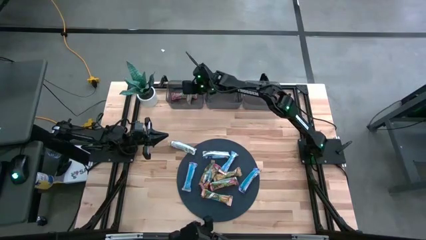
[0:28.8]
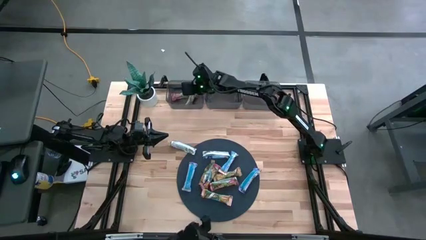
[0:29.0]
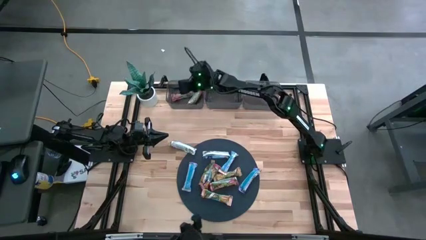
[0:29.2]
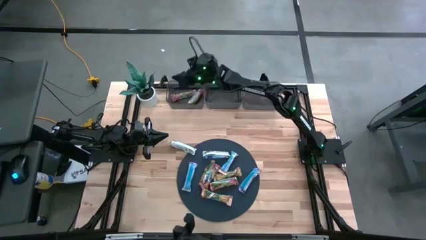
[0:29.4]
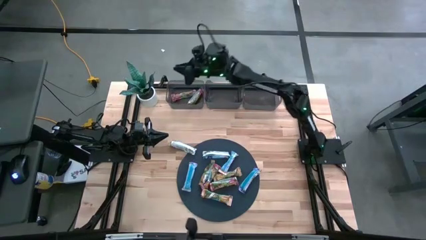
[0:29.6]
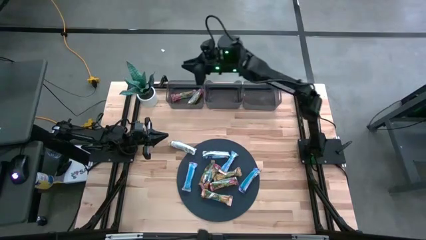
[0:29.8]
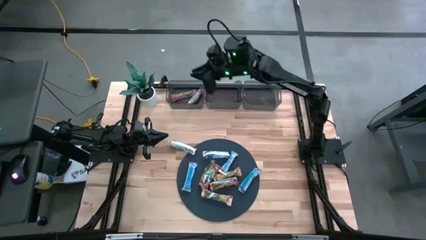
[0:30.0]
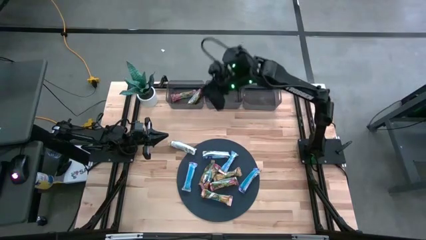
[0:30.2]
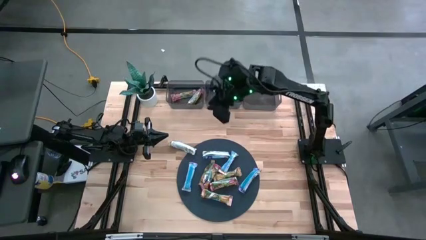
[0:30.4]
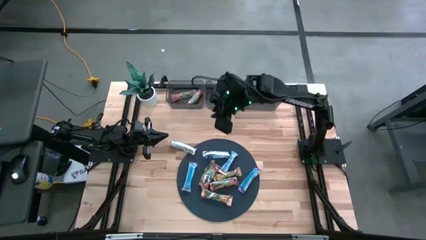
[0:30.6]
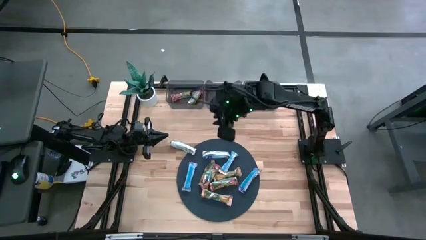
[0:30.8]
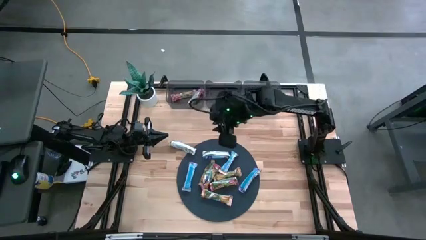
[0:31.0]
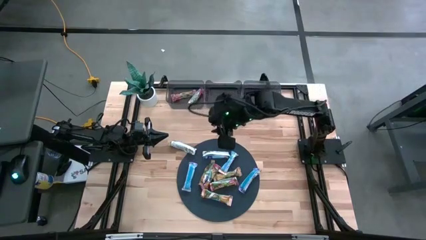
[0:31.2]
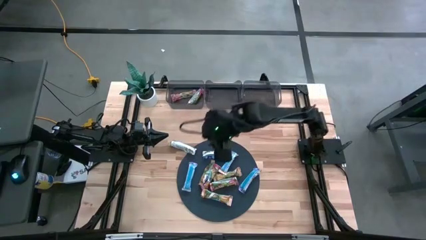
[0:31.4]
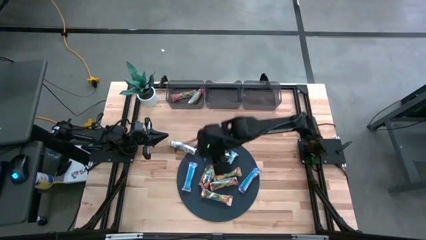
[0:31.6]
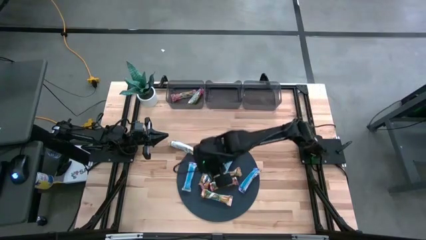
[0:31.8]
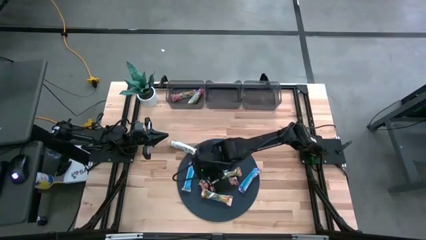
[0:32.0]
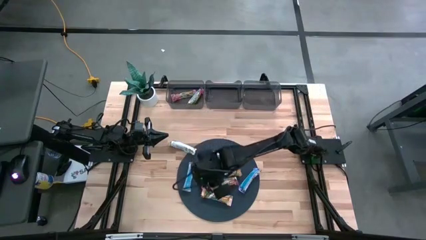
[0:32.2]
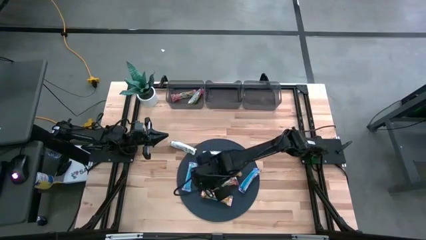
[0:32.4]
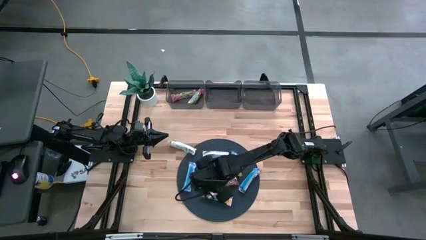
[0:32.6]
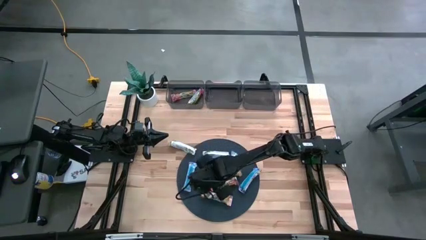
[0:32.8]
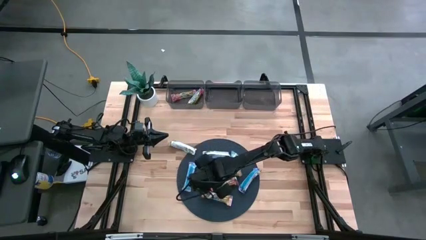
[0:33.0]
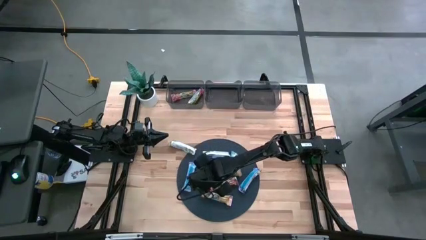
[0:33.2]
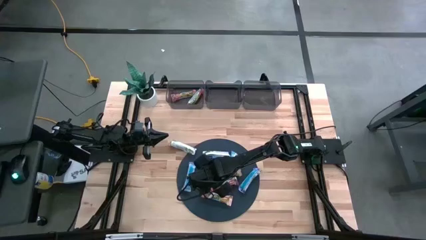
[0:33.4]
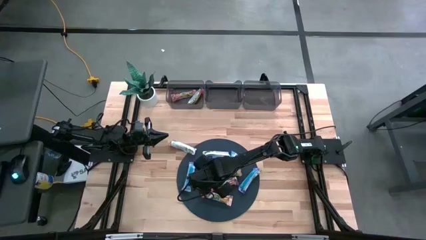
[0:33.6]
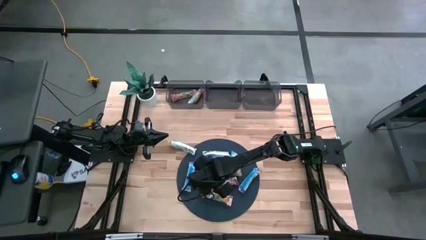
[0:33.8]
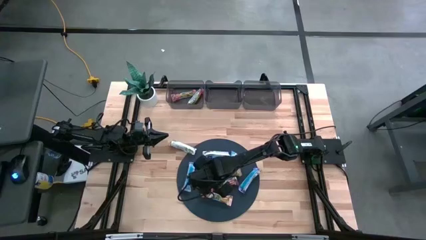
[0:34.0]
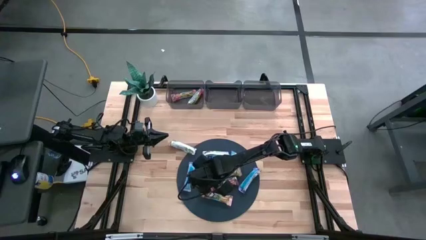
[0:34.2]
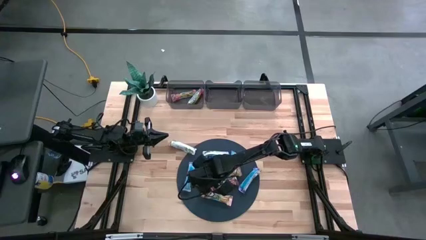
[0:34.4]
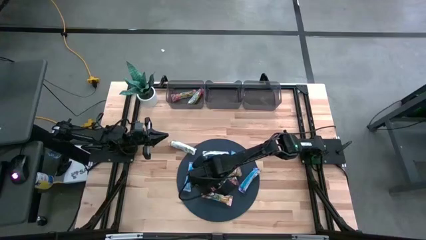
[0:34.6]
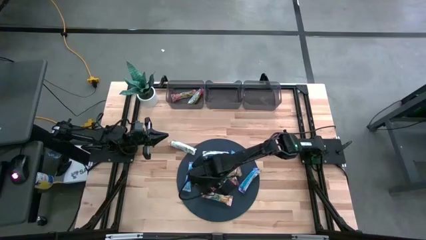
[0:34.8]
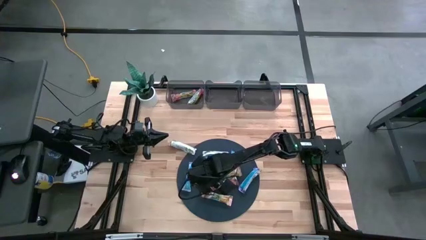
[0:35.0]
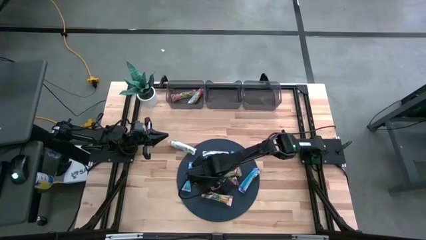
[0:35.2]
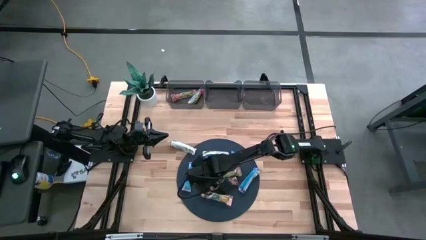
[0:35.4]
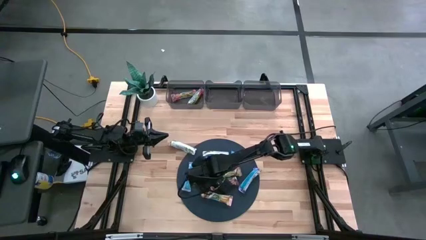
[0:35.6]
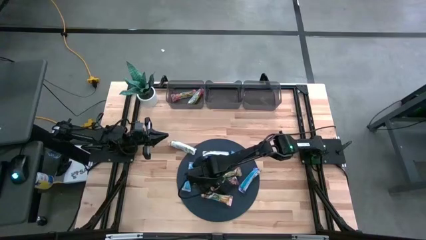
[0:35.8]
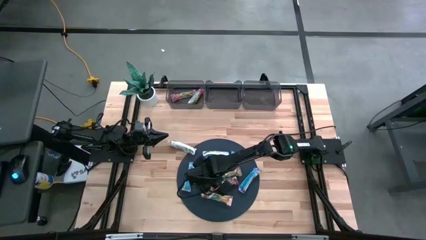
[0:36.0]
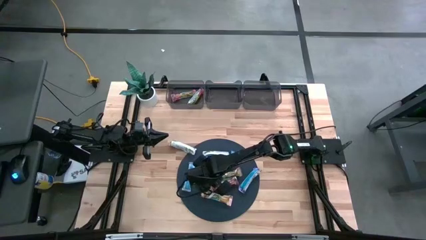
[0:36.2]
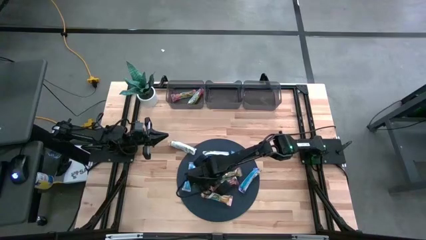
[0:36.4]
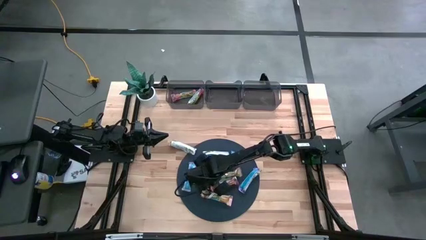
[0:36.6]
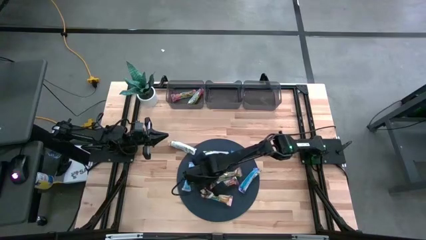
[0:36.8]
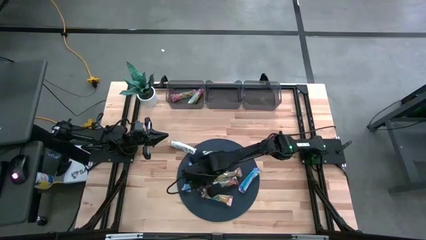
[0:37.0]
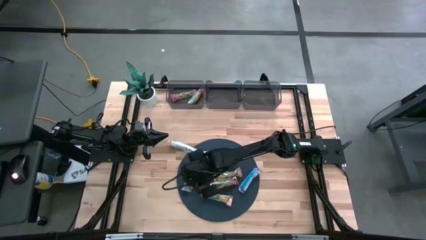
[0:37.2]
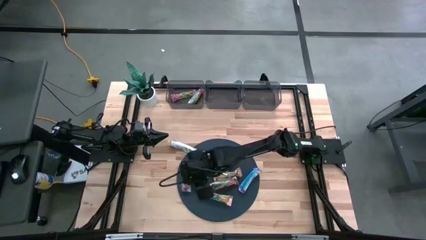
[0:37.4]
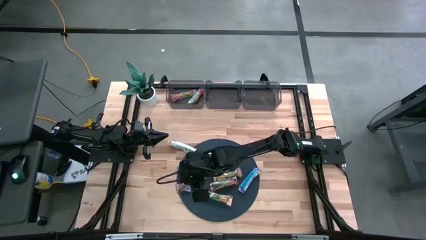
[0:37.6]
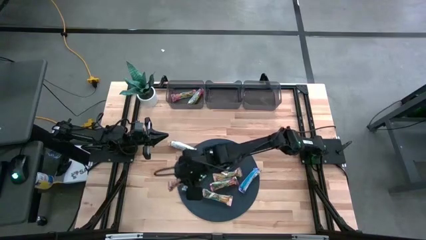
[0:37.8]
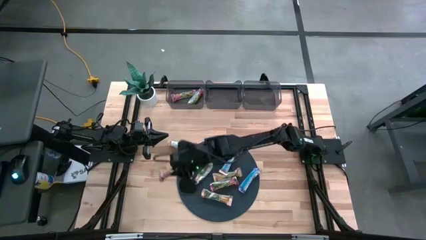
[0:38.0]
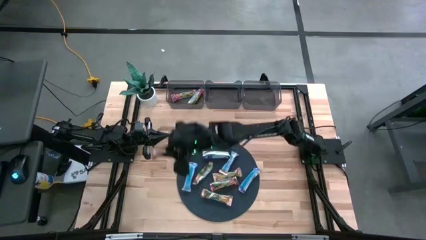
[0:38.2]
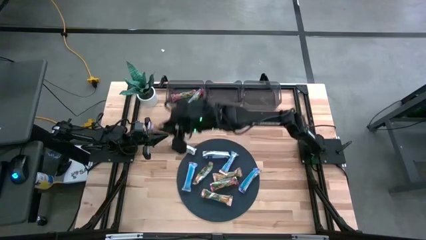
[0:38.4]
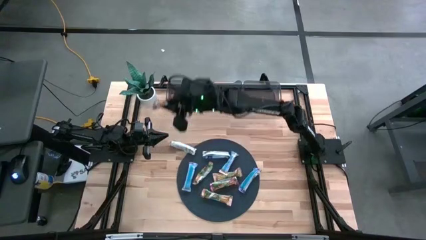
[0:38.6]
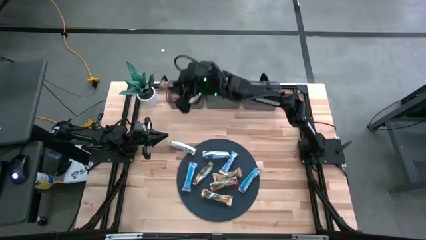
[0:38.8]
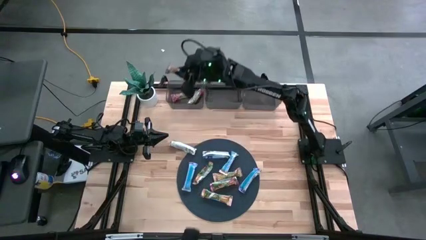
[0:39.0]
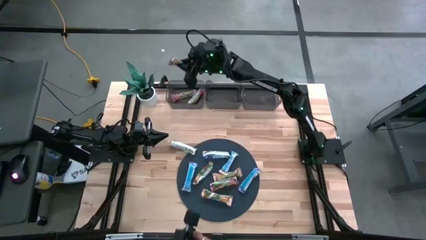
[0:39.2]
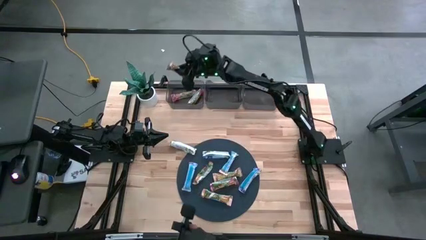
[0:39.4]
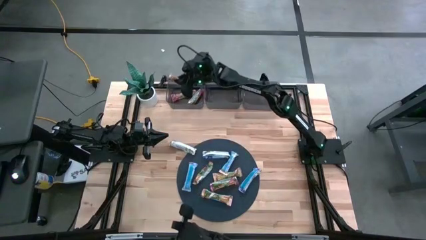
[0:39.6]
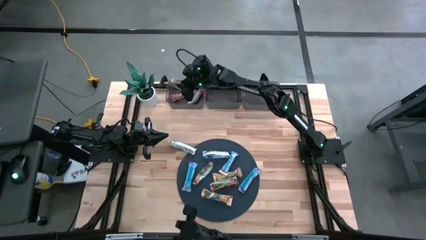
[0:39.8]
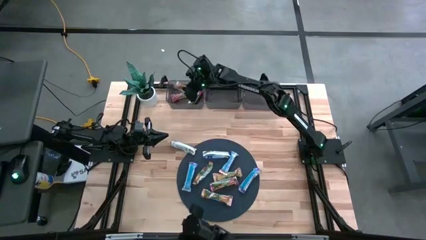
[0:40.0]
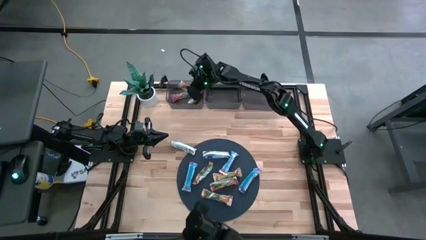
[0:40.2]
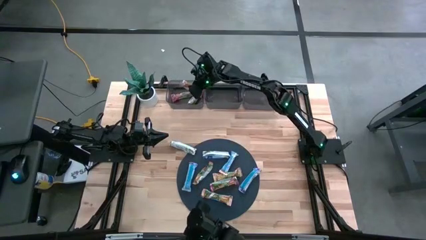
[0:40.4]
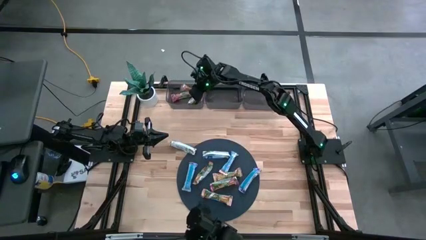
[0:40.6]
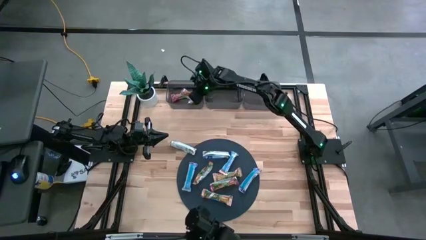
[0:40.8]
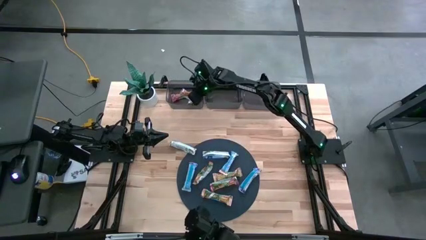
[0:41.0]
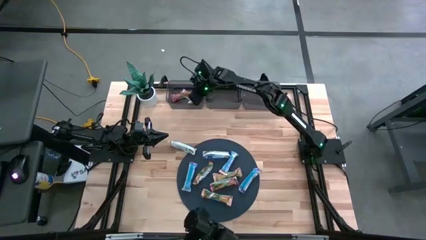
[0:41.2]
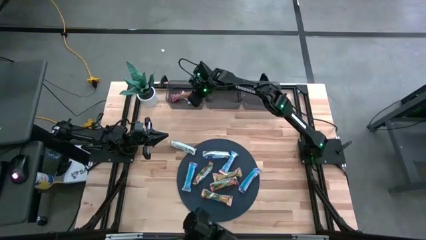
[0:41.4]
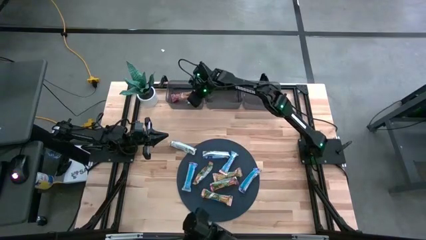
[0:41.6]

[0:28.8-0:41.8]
Task: Pick and place Granola Bars by type
Put the red granola bar into the left black bin
